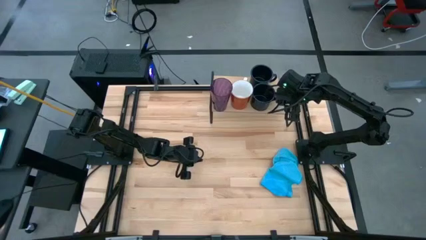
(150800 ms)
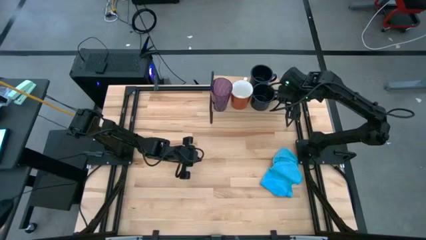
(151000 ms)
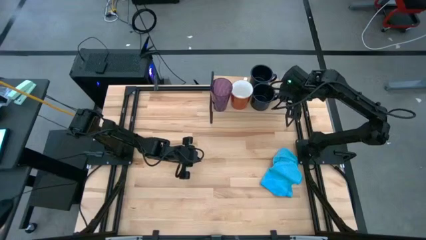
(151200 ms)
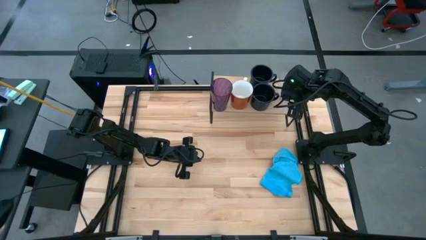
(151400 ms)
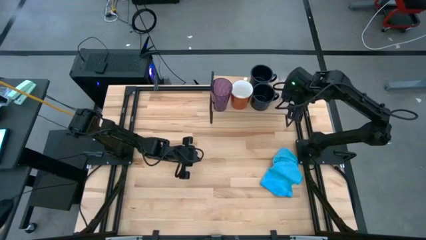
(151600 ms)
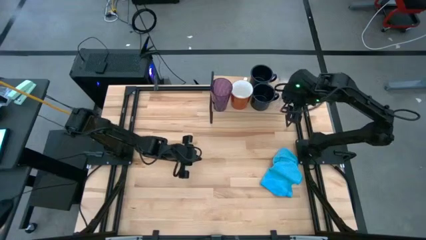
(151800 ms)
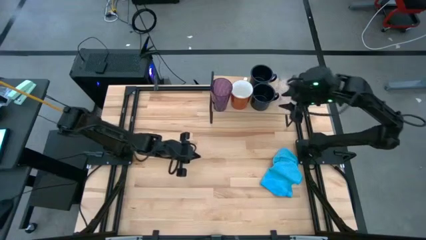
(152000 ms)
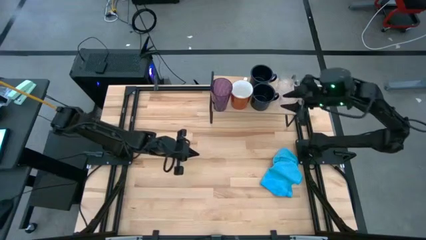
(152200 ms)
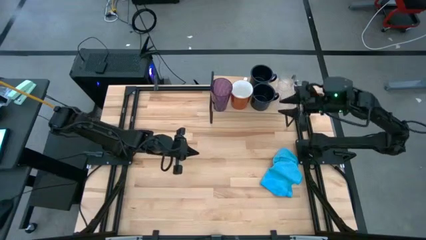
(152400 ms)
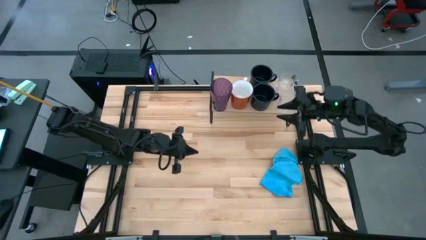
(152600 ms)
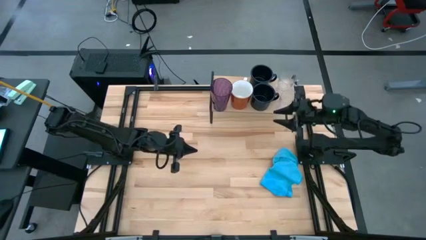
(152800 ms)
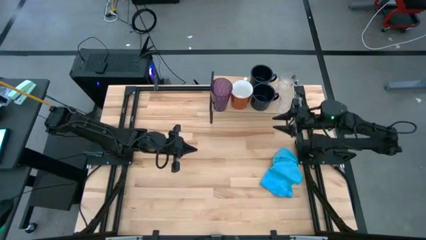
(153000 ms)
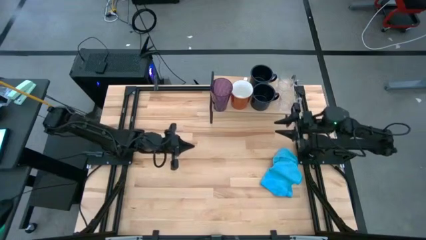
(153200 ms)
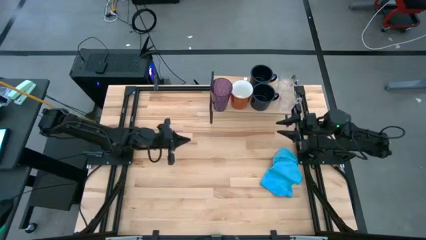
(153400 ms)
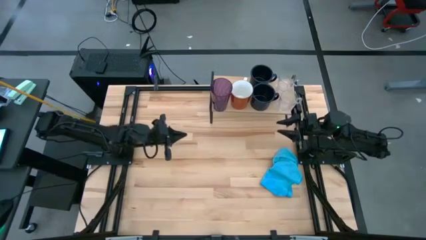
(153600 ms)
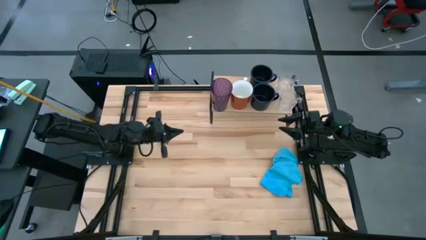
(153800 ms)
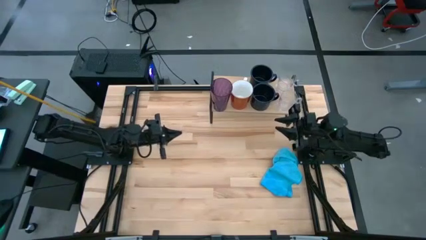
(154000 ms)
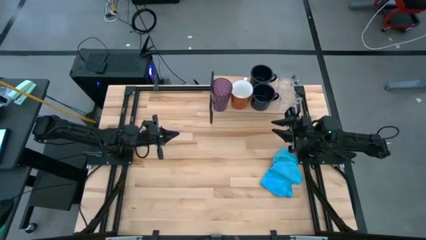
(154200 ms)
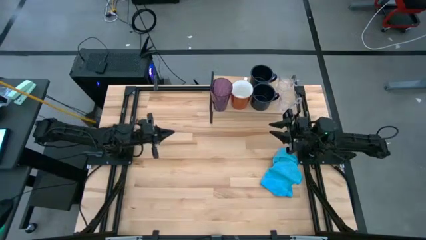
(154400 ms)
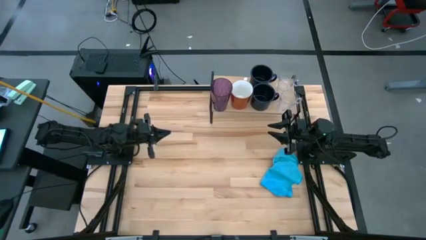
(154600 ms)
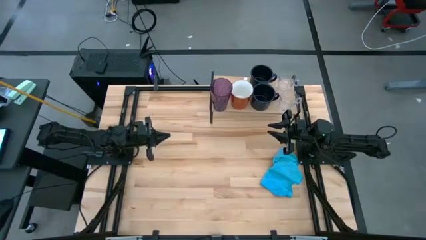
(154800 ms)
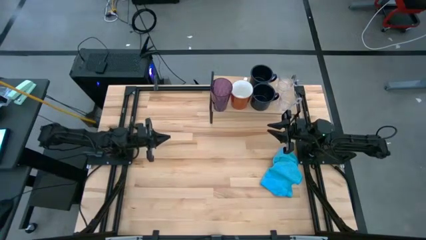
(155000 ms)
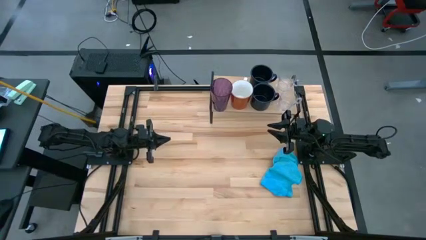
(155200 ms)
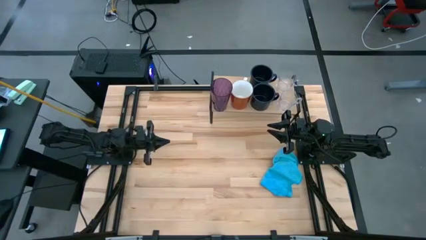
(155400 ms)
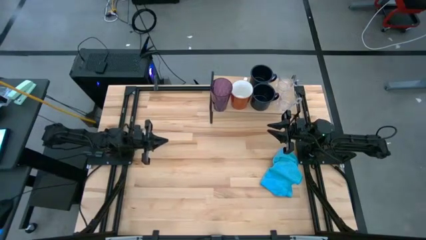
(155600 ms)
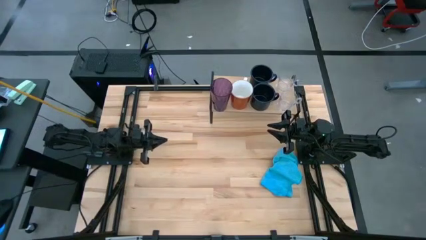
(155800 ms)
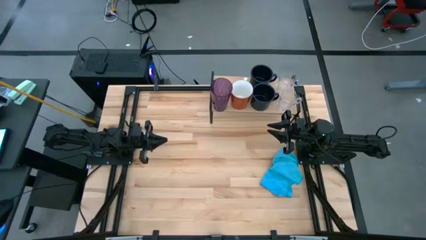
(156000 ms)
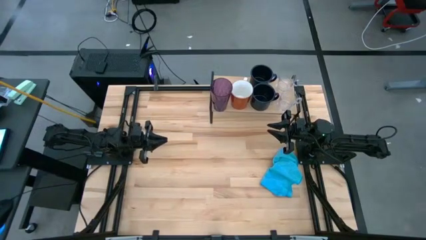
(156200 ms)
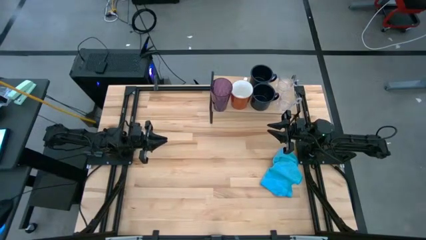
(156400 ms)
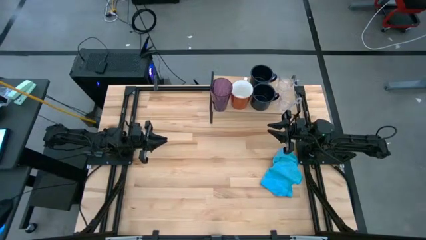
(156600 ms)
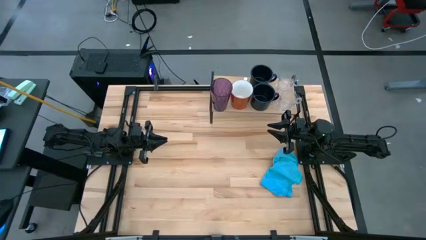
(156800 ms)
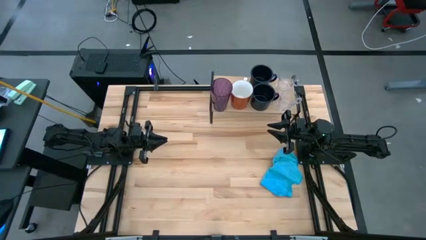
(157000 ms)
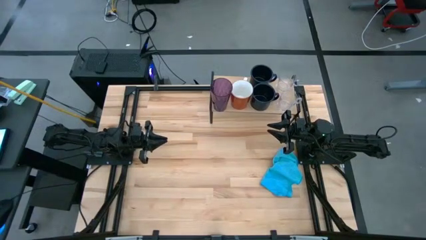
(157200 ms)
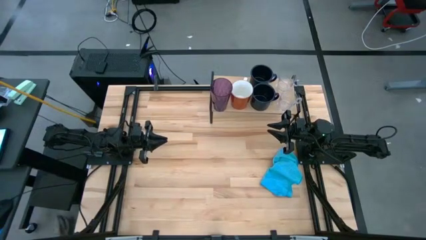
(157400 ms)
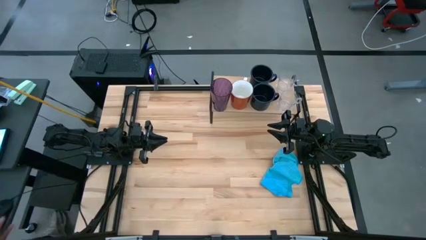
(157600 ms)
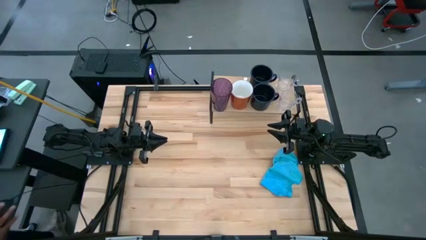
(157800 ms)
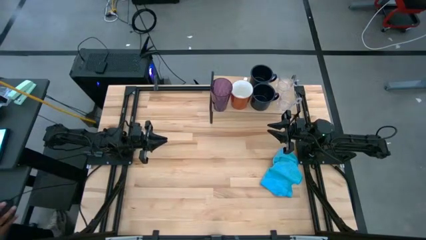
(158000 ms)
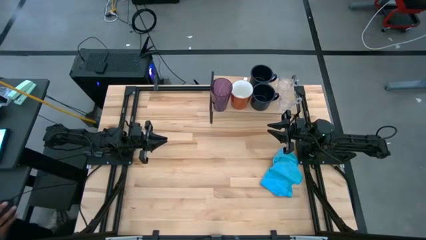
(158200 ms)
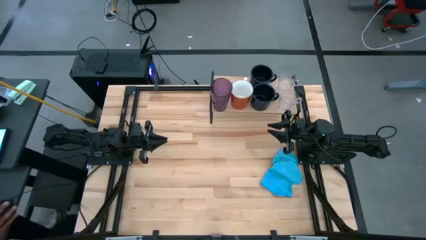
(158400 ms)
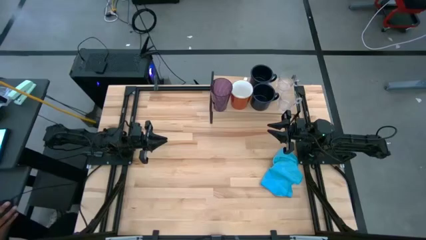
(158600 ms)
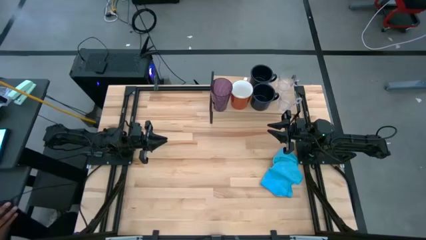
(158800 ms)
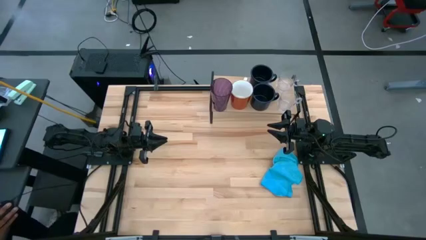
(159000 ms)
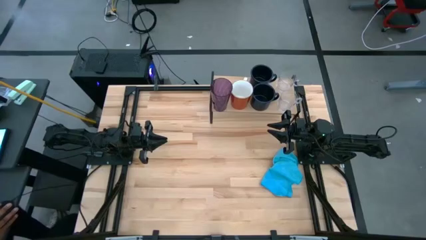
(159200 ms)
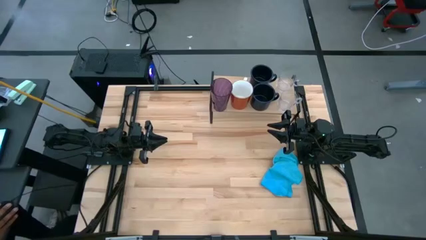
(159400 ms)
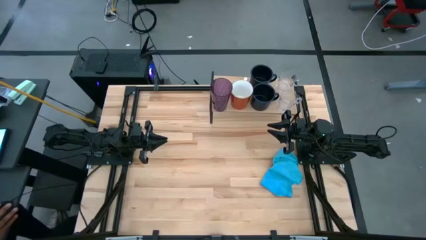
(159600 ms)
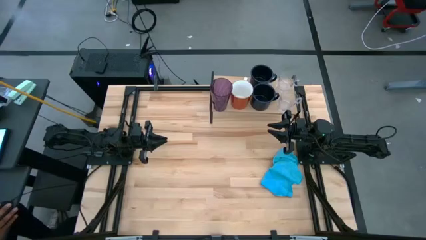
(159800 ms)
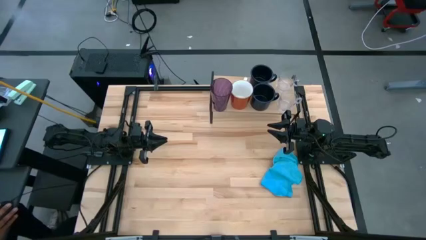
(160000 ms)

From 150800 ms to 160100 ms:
Task: Stack small to large cups/mugs on shelf
Return to Home Position

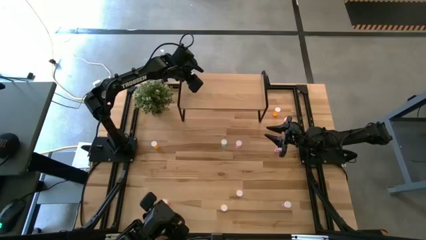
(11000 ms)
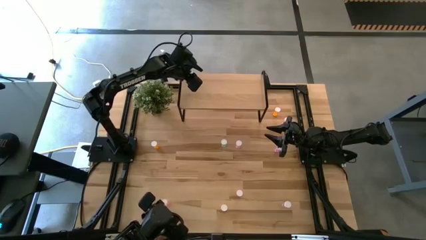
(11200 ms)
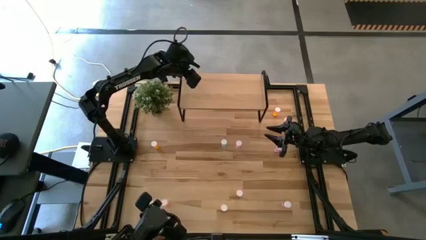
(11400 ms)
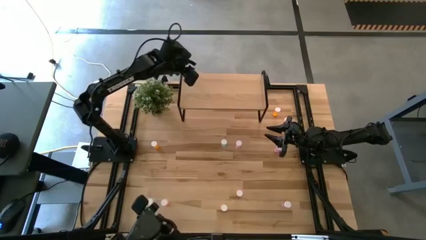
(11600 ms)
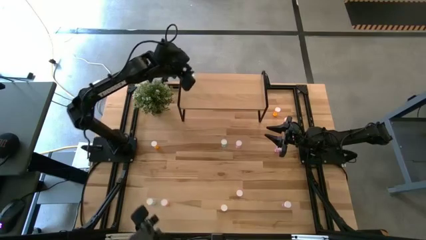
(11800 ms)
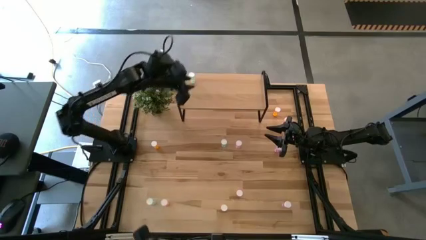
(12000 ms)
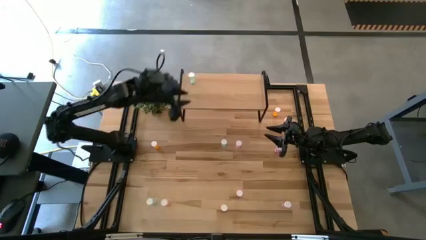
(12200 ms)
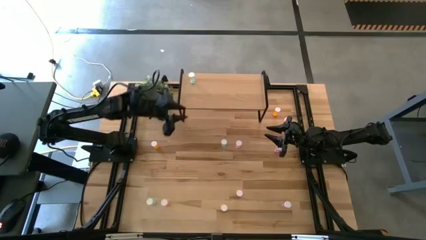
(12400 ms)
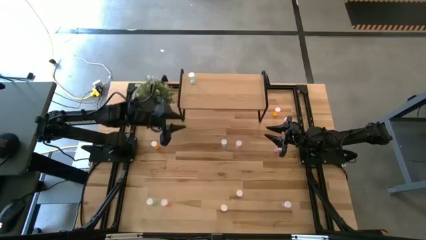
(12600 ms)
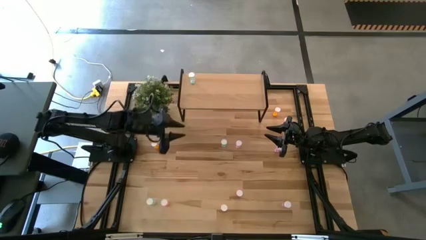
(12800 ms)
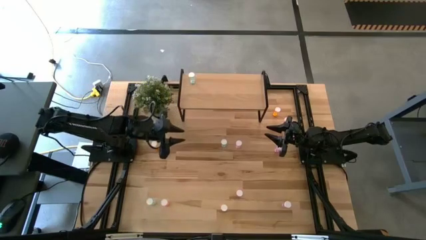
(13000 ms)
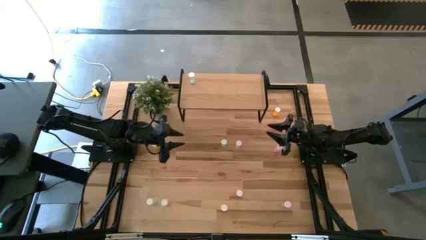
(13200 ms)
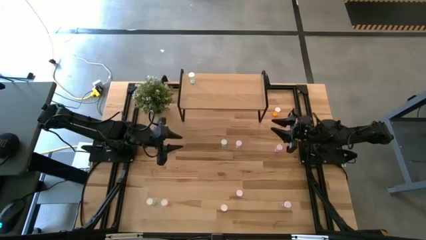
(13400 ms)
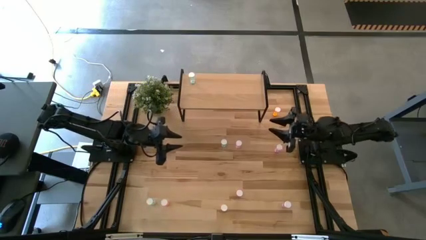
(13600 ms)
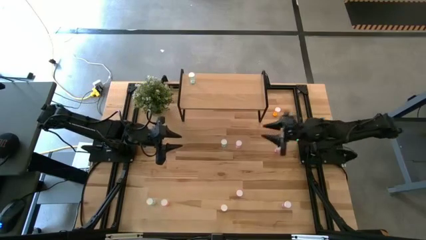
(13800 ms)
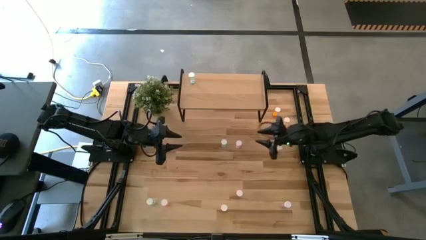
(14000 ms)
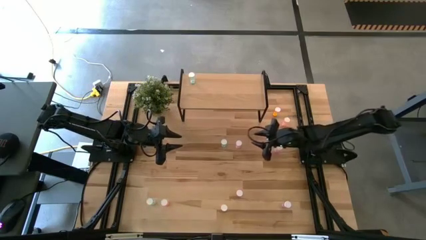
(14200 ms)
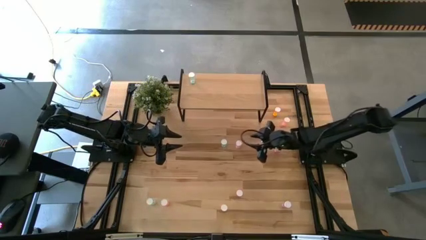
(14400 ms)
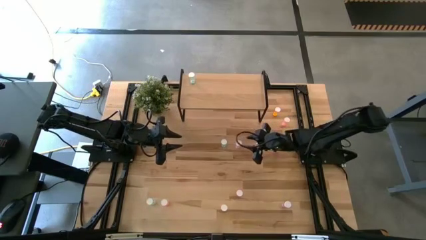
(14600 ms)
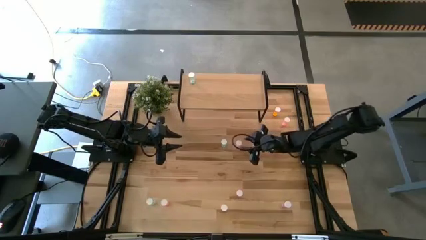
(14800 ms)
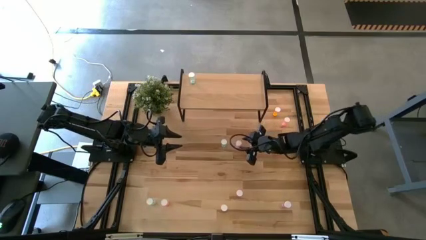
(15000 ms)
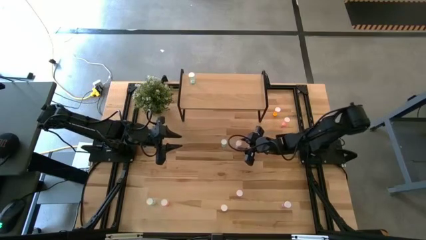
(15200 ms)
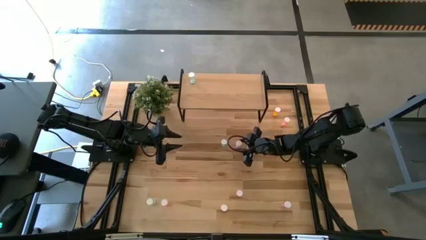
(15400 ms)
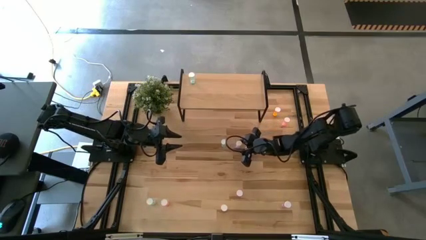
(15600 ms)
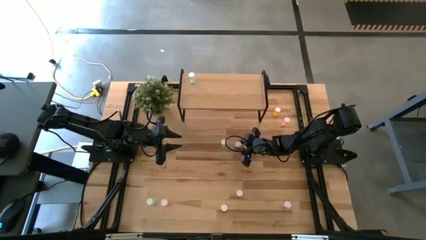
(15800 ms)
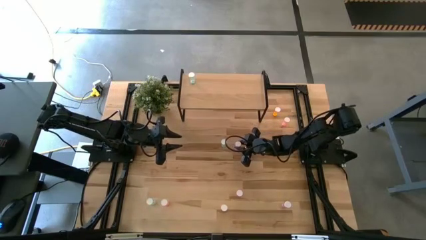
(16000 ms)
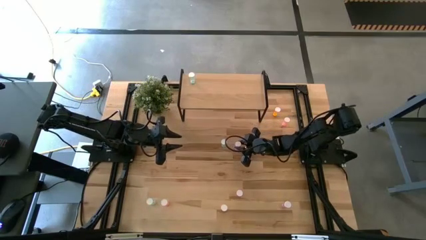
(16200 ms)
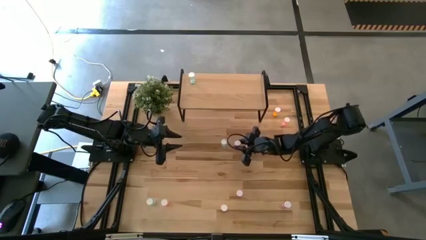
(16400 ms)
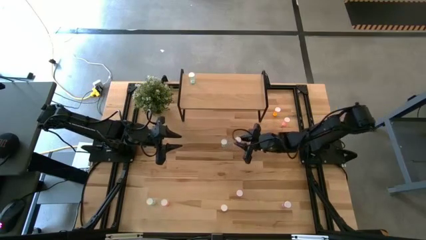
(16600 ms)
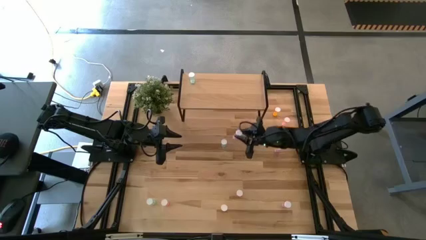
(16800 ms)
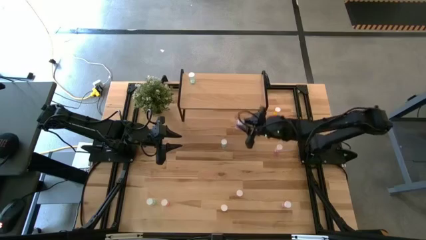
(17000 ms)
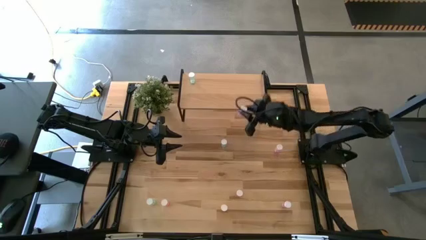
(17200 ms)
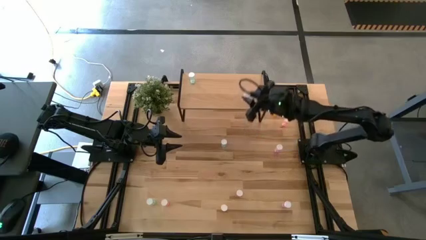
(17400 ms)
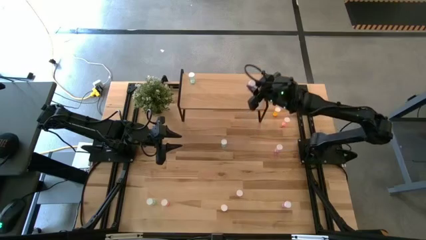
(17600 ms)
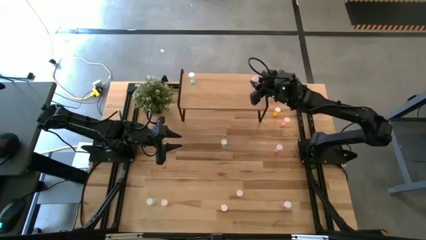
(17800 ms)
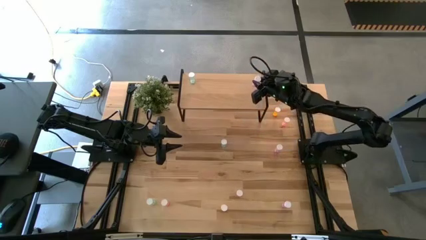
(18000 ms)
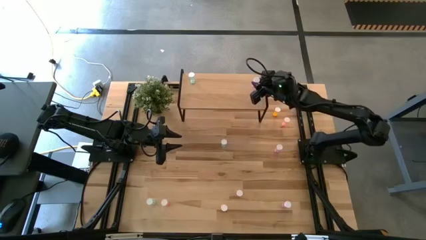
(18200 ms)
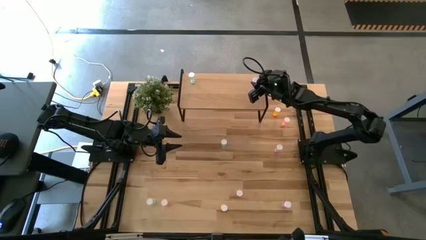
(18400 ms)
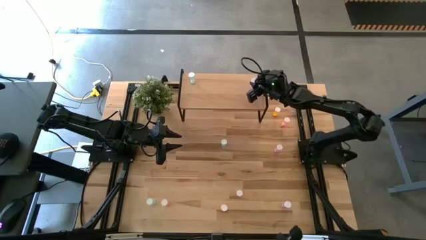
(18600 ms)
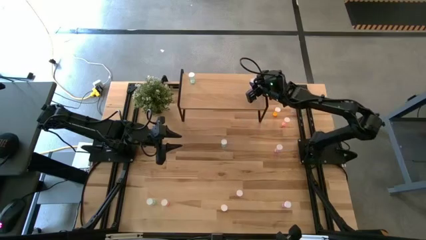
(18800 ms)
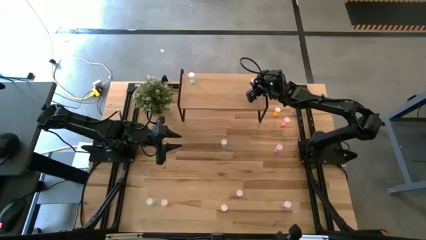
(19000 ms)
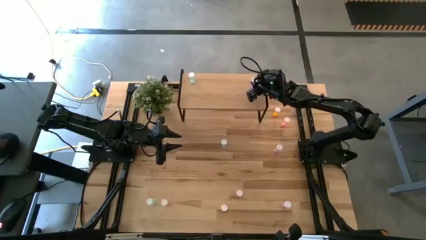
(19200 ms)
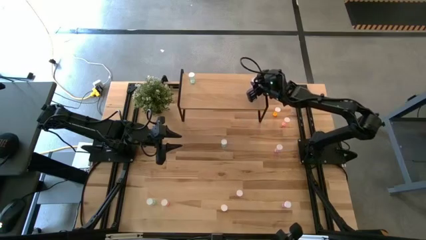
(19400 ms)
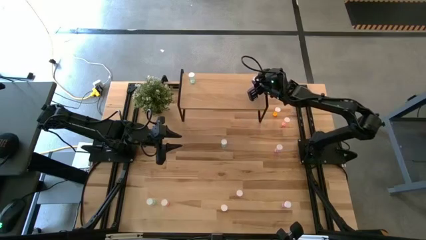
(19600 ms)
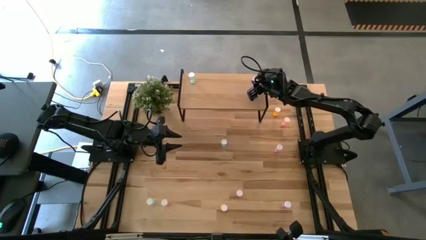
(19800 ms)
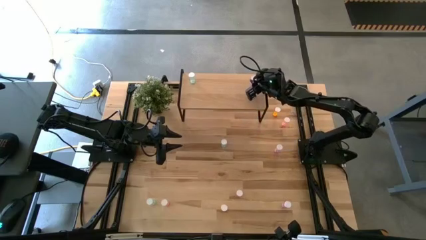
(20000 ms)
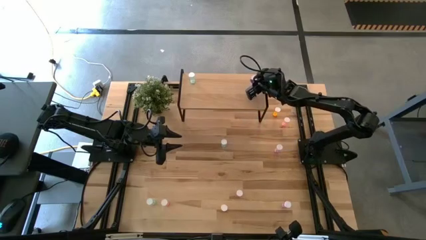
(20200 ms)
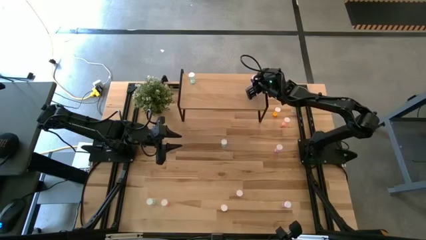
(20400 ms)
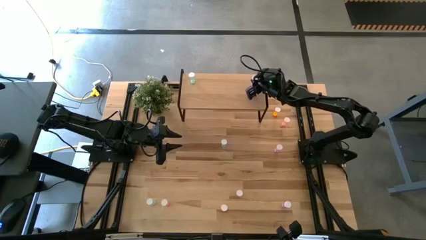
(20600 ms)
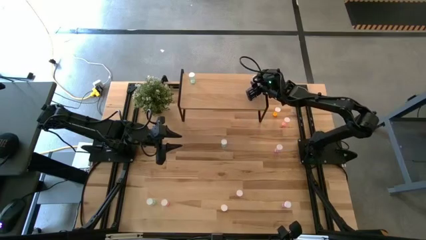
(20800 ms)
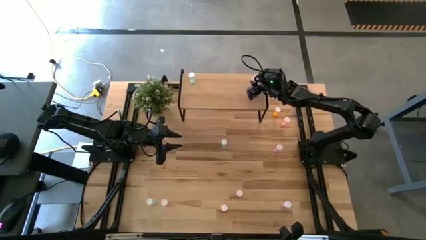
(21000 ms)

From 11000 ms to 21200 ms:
Task: Pick and place medicine bottles onto shelf by color
Put the top left purple pill bottle on the shelf
